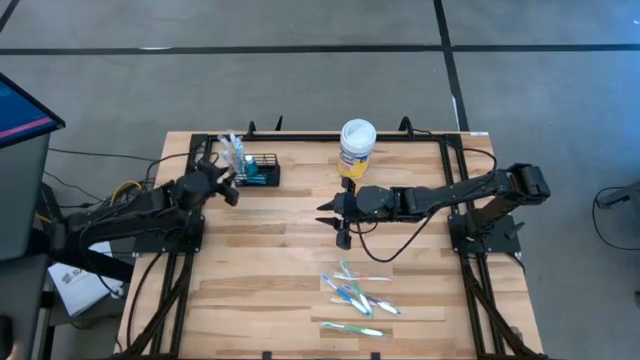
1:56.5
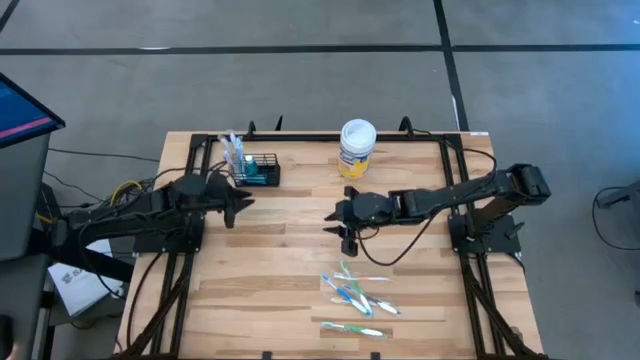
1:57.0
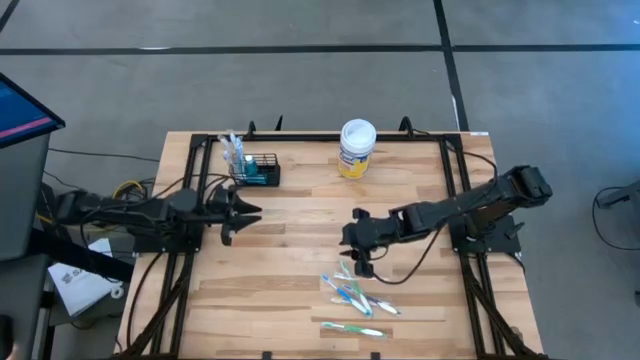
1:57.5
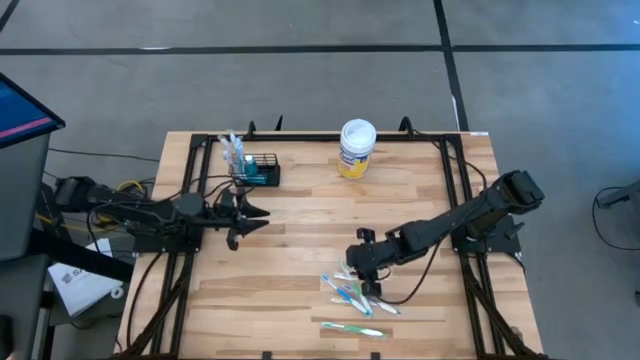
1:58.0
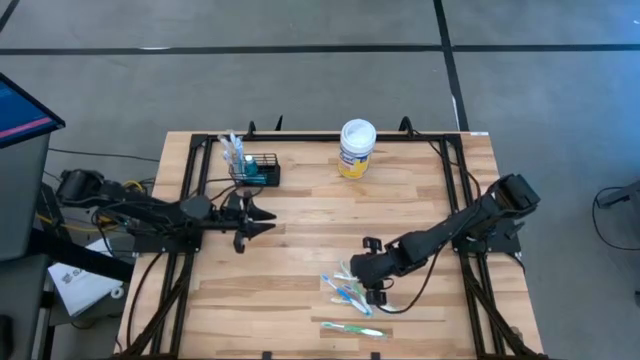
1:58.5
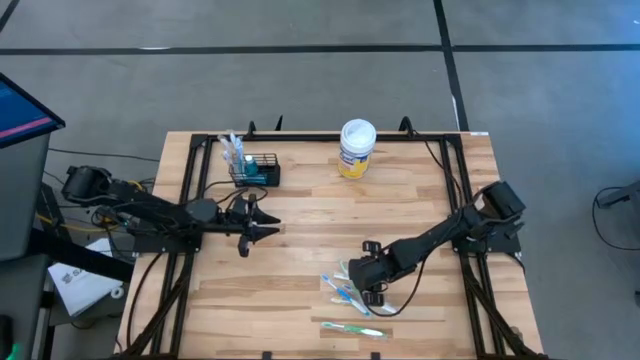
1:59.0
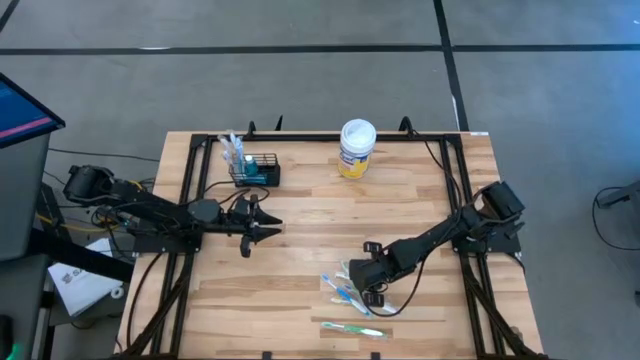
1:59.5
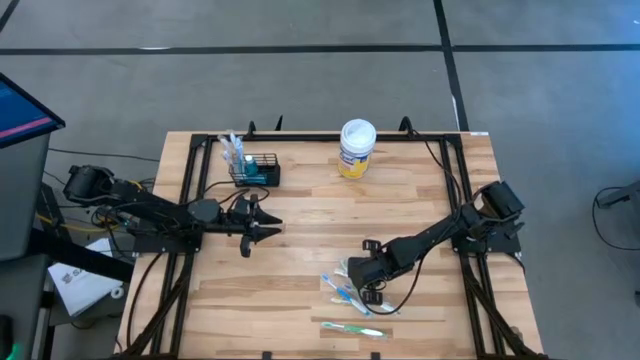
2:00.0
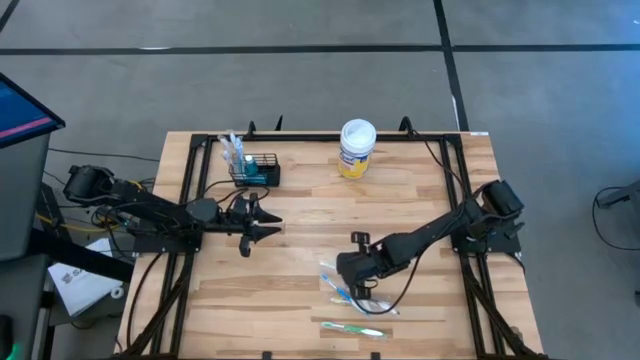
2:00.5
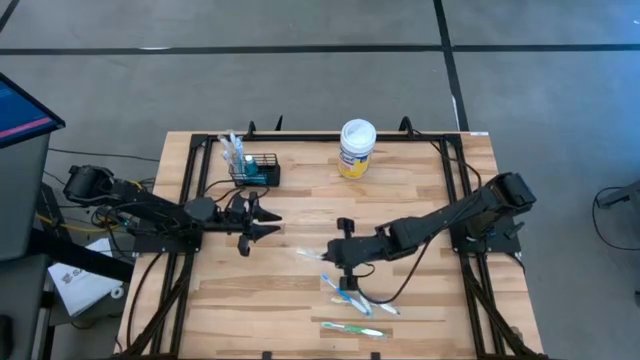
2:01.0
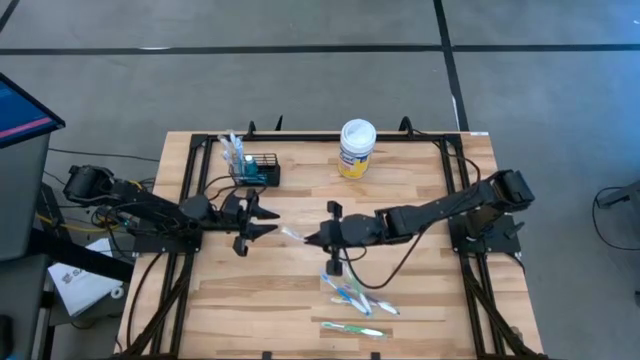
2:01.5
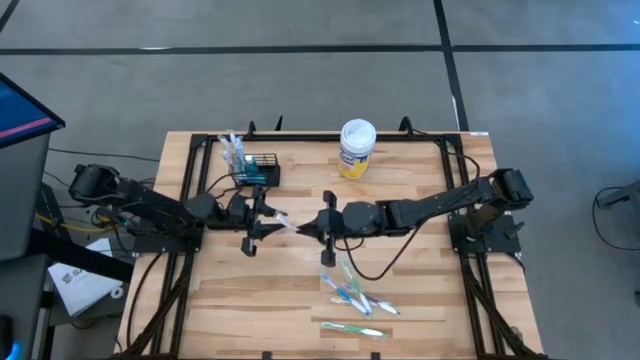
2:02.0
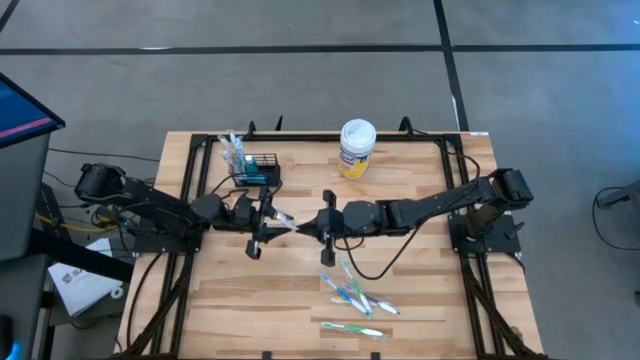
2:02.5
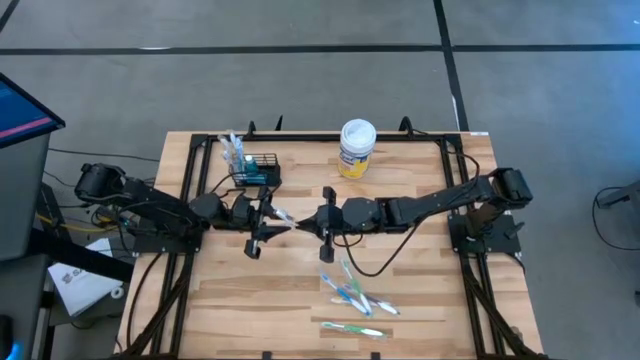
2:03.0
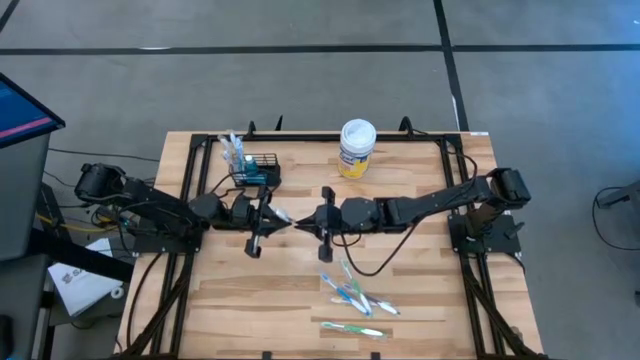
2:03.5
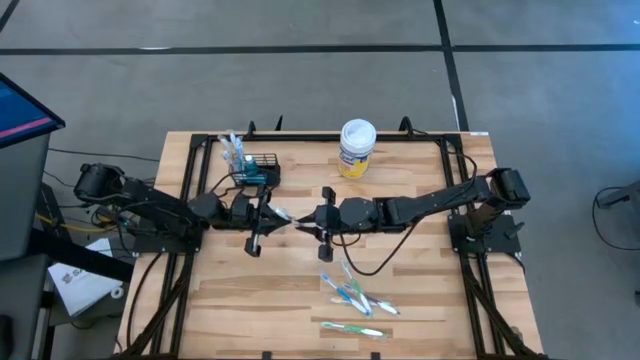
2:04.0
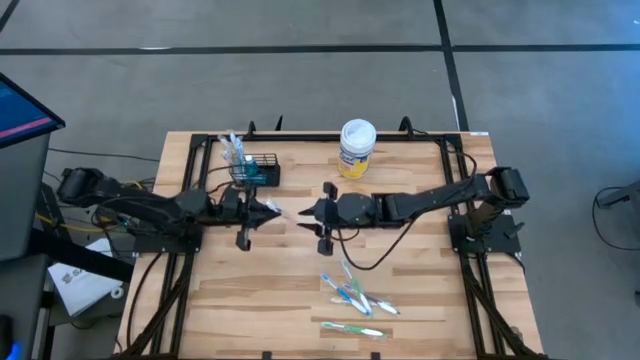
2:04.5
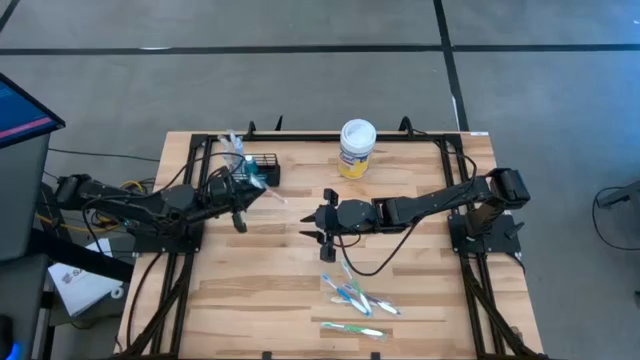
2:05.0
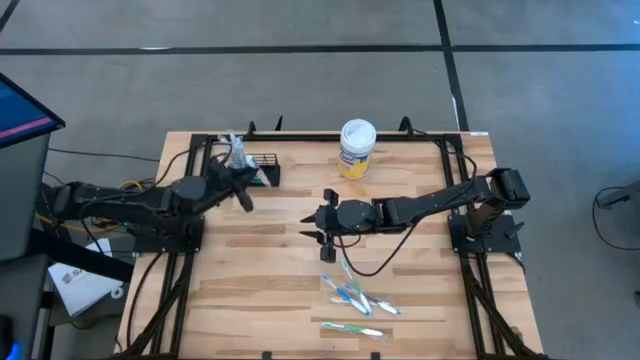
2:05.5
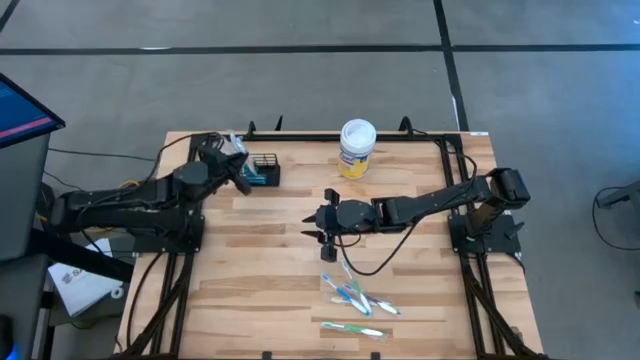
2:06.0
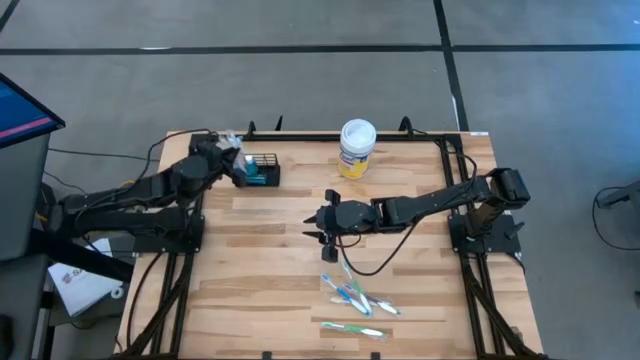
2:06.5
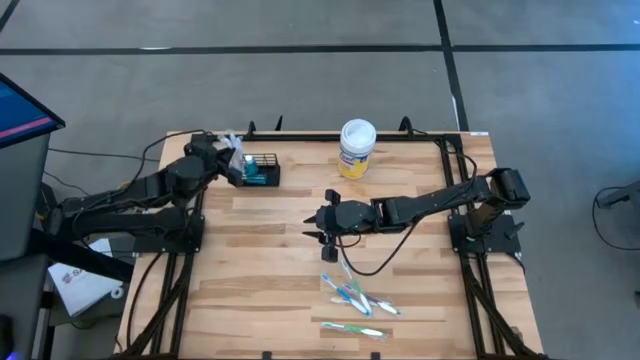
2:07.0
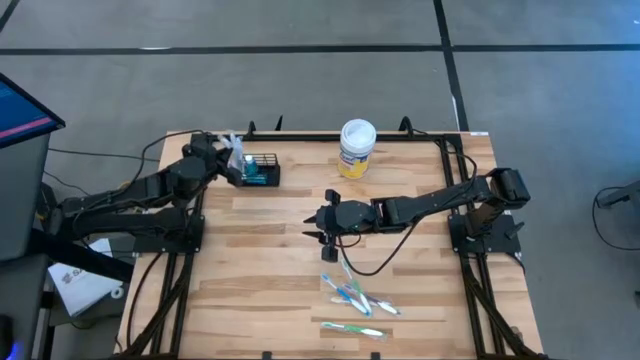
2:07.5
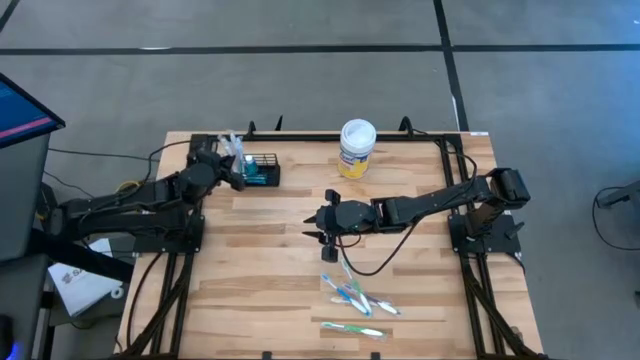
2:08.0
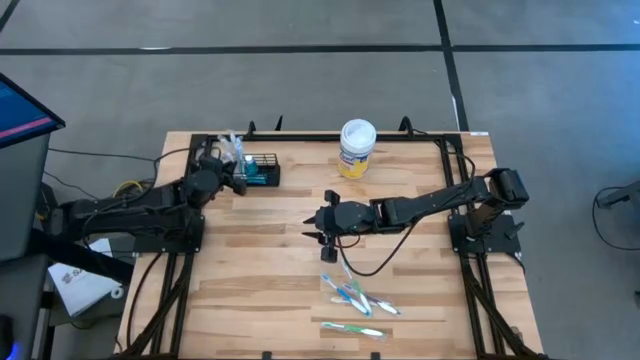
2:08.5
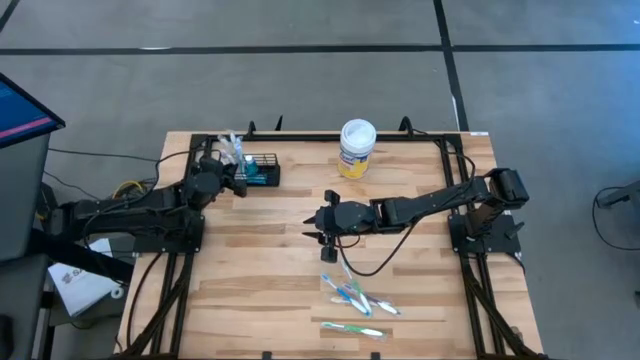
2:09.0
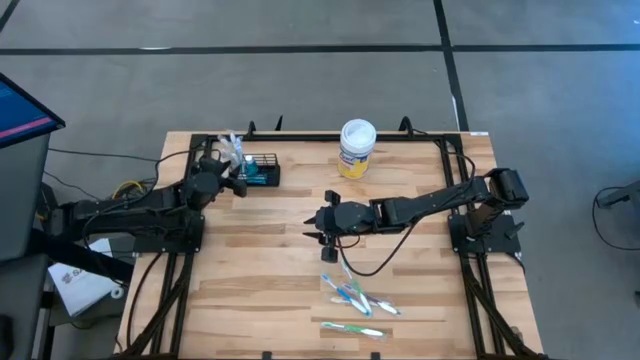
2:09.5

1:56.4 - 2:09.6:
Task: Pick & Place toothbrushing station
Put the top orange toothbrush into the mesh organizer

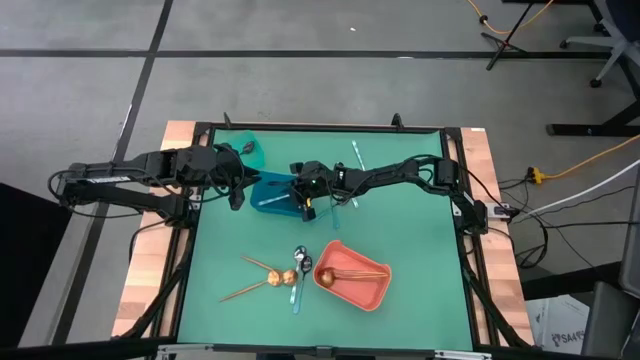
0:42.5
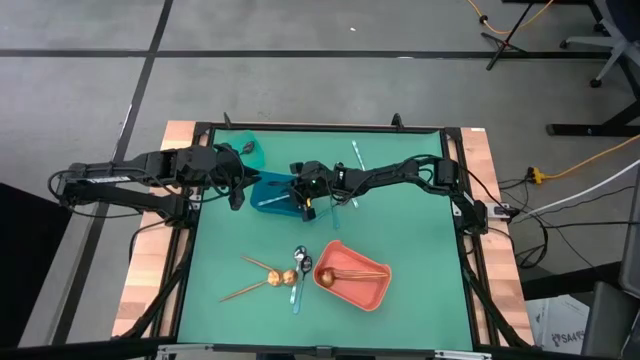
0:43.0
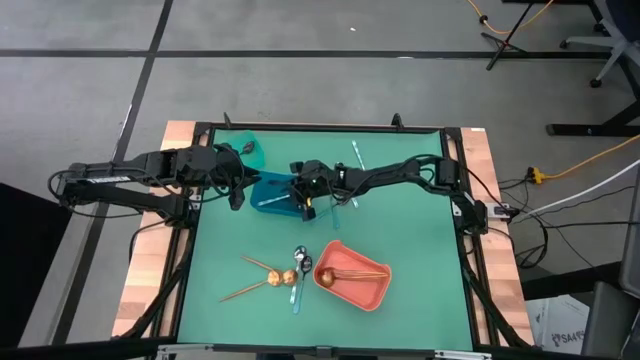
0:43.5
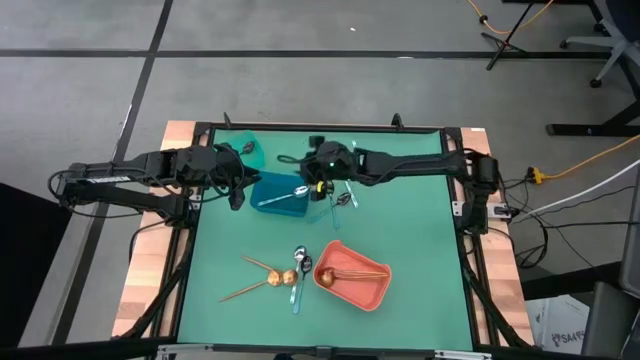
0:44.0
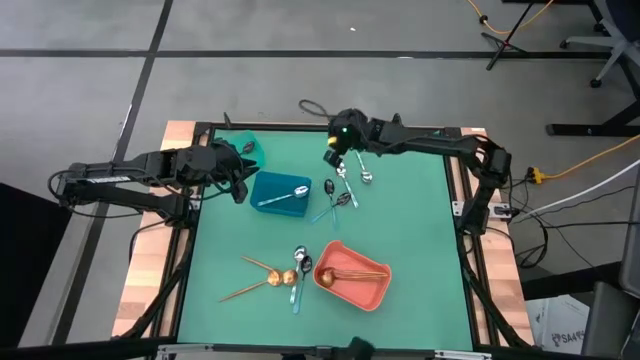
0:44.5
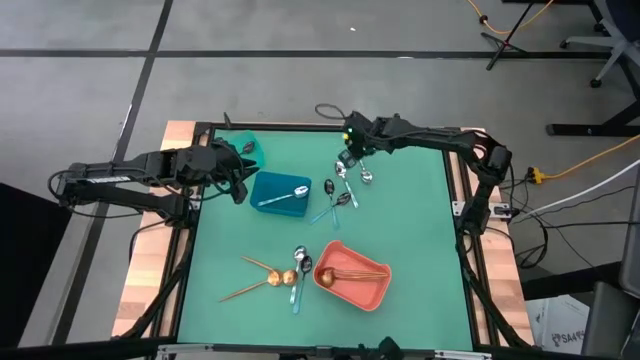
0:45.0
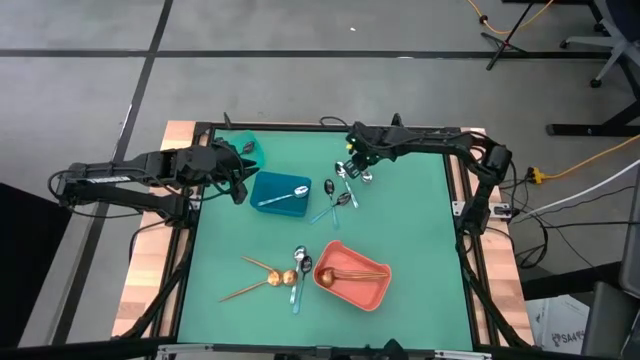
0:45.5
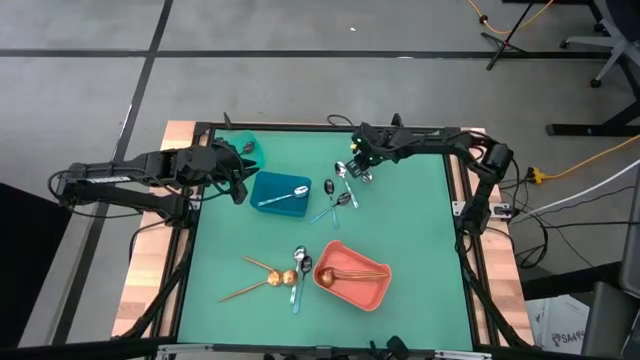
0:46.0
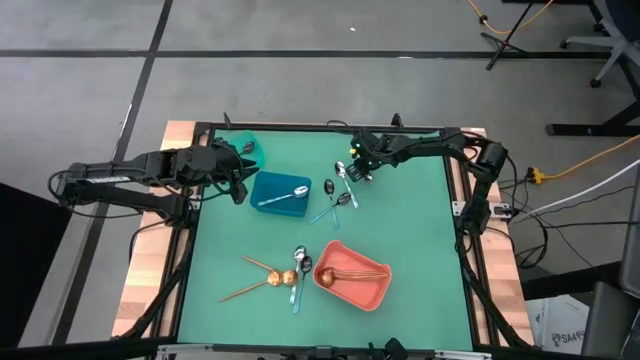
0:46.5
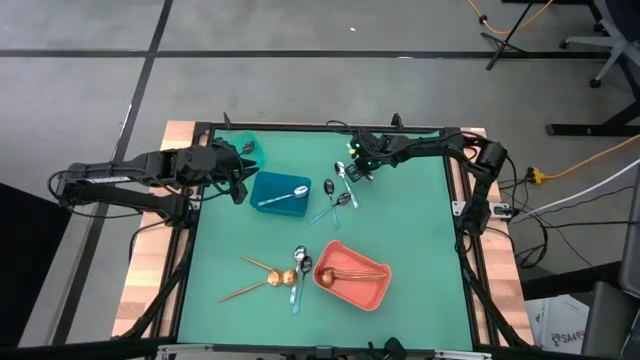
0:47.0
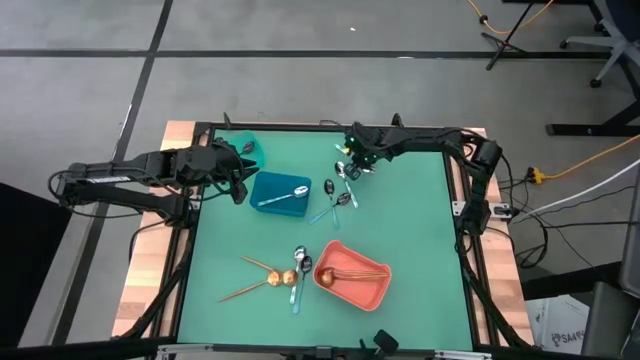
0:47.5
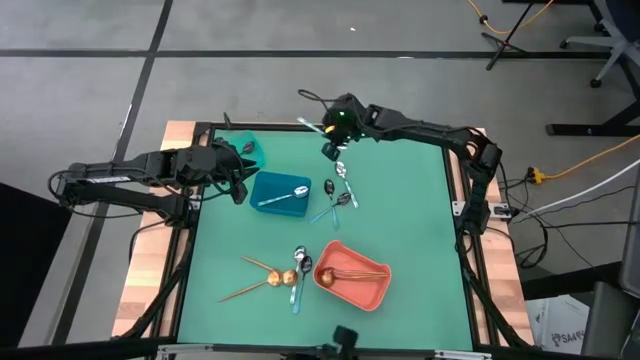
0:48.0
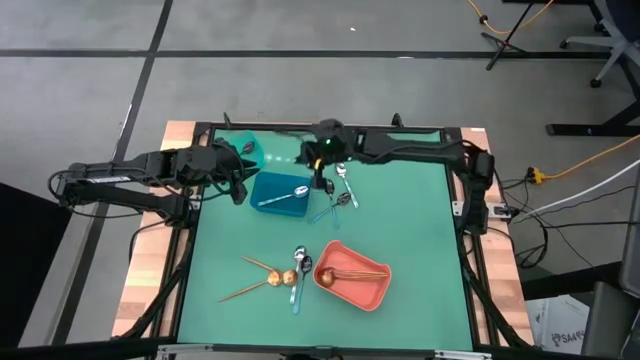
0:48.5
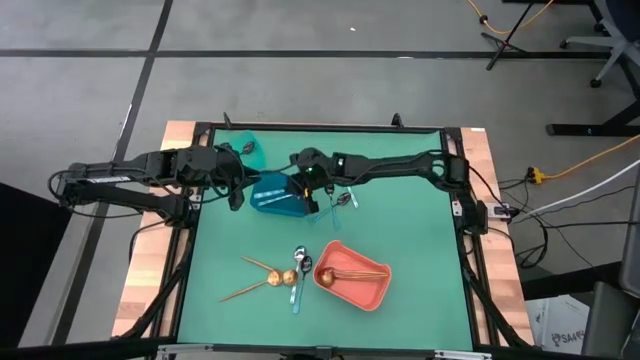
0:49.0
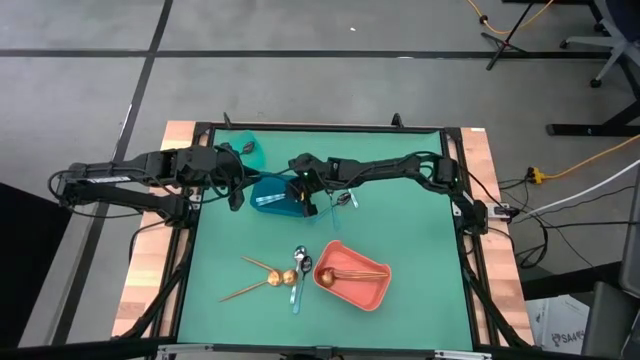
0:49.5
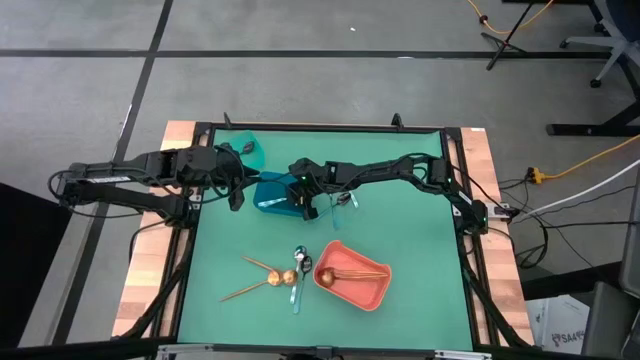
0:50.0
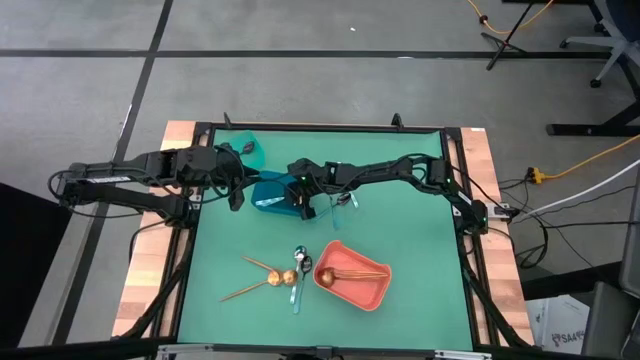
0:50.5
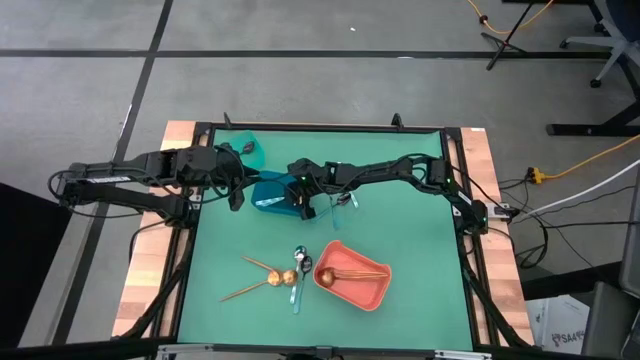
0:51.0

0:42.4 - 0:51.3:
Task: Sort silverware by color (type)
Put the patterned blue spoon into the blue bin
